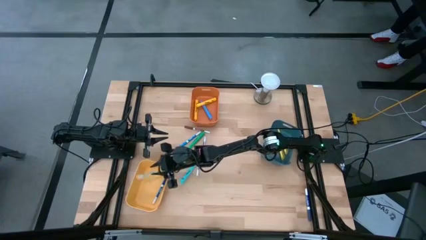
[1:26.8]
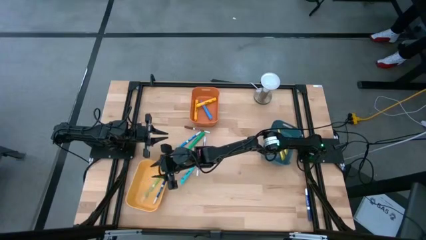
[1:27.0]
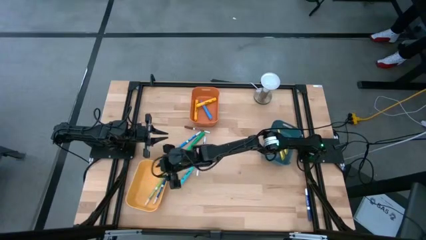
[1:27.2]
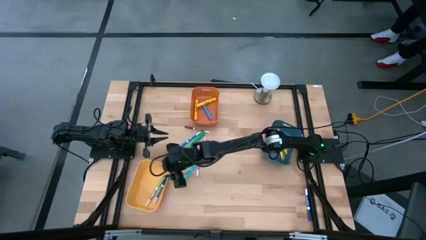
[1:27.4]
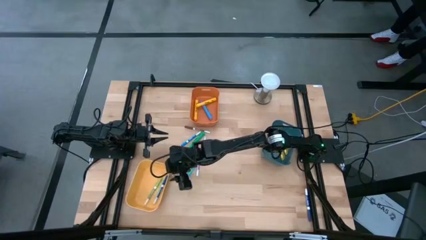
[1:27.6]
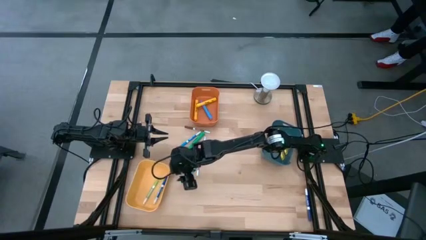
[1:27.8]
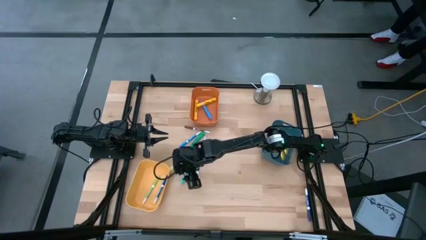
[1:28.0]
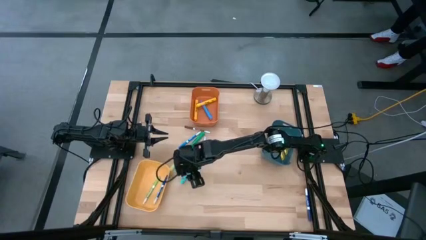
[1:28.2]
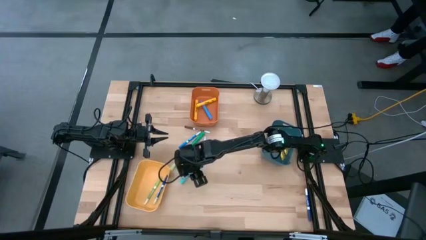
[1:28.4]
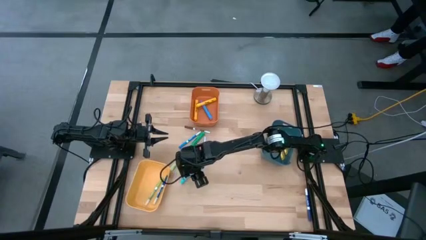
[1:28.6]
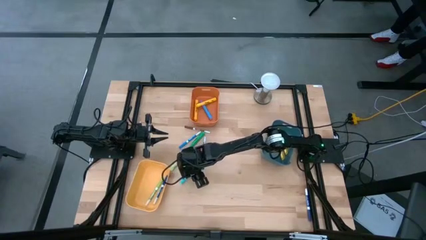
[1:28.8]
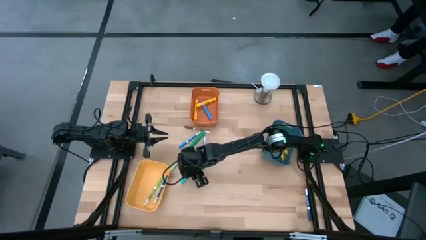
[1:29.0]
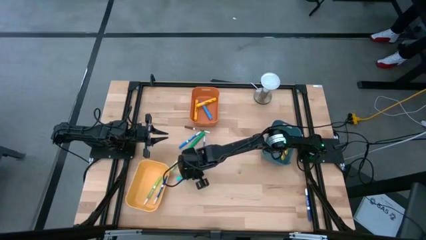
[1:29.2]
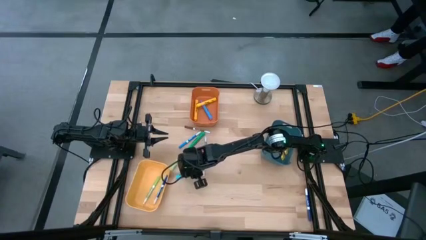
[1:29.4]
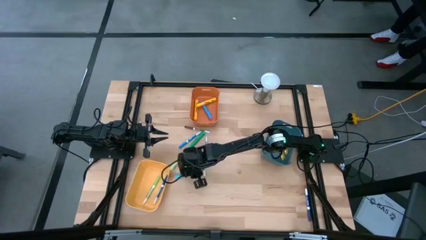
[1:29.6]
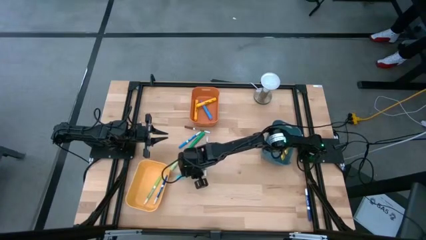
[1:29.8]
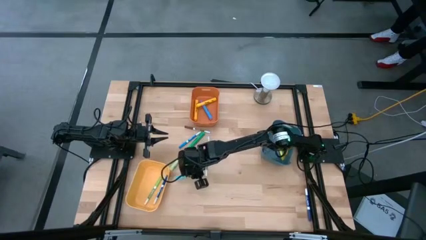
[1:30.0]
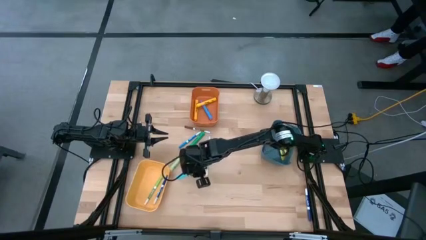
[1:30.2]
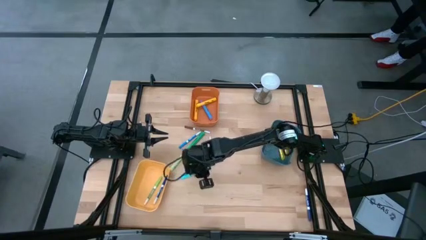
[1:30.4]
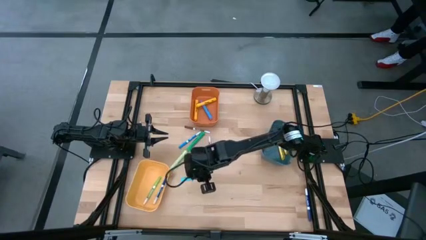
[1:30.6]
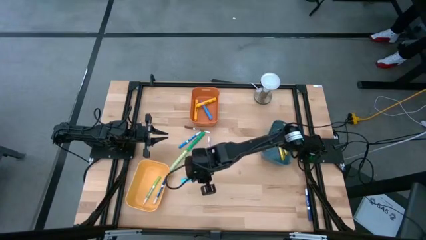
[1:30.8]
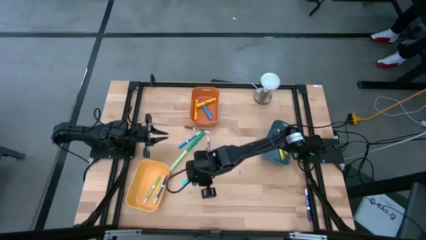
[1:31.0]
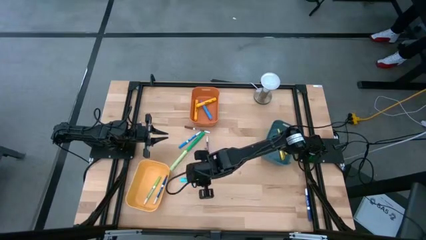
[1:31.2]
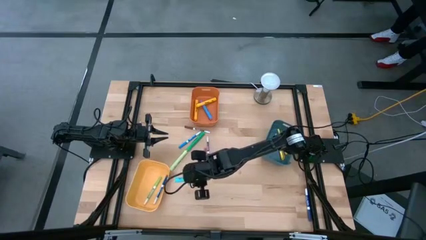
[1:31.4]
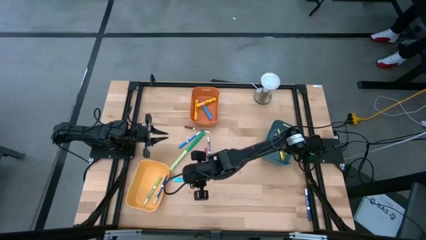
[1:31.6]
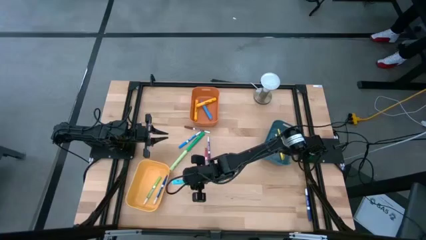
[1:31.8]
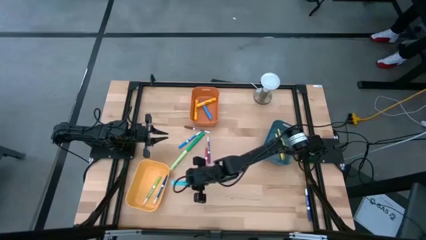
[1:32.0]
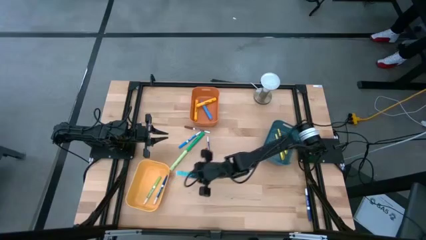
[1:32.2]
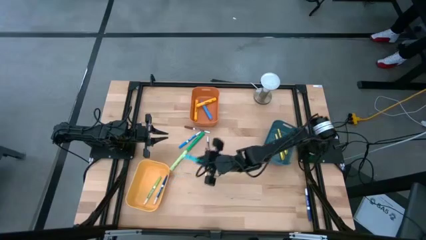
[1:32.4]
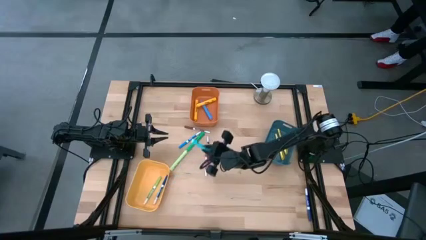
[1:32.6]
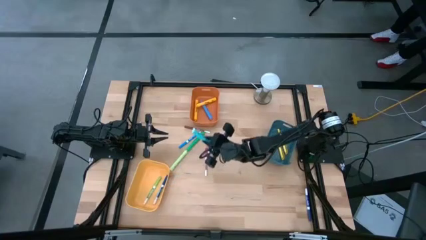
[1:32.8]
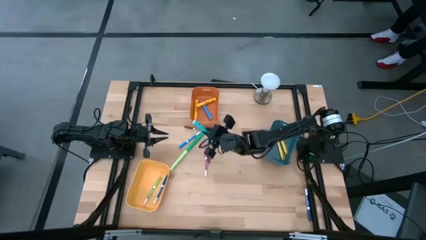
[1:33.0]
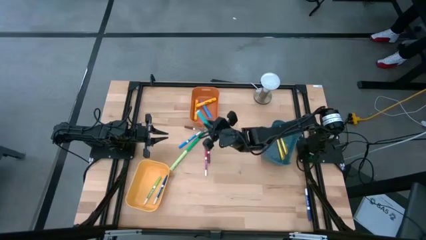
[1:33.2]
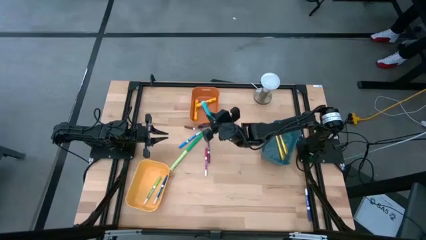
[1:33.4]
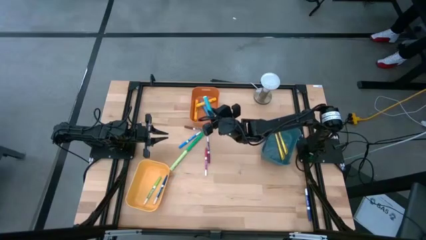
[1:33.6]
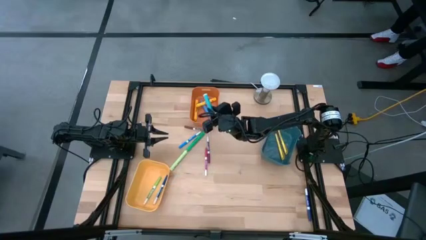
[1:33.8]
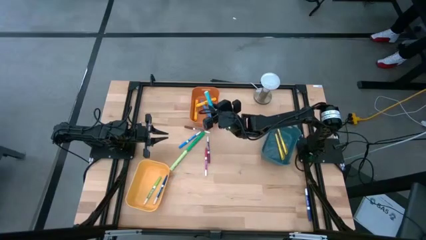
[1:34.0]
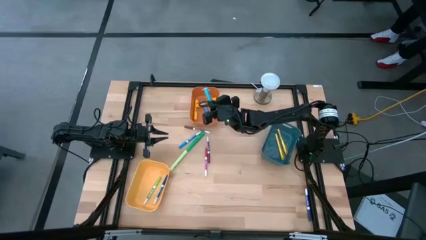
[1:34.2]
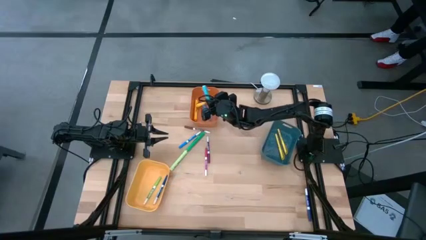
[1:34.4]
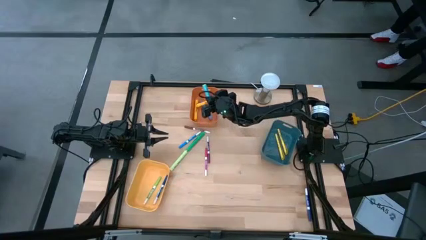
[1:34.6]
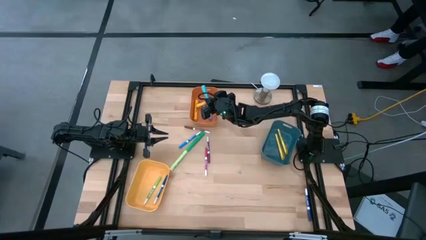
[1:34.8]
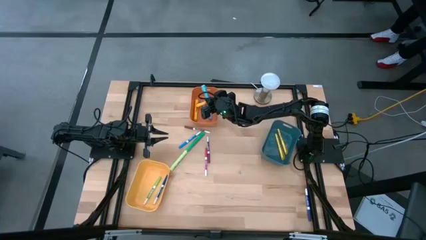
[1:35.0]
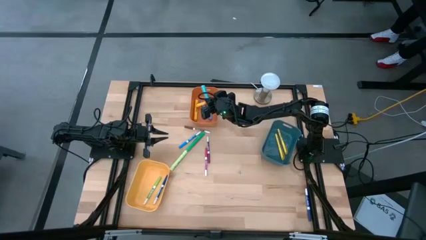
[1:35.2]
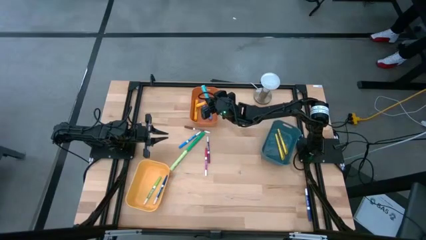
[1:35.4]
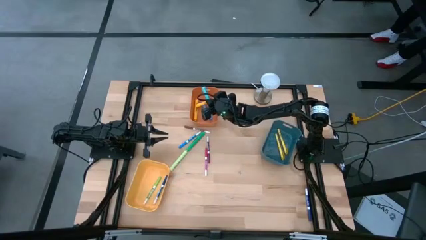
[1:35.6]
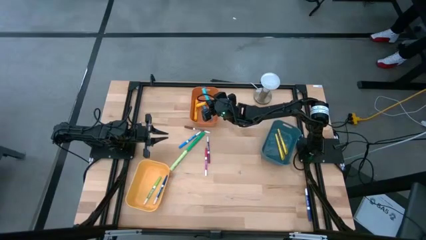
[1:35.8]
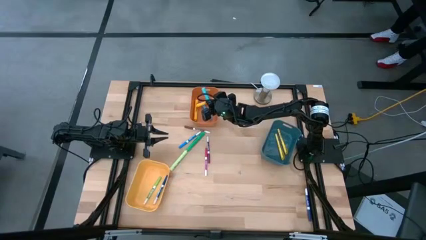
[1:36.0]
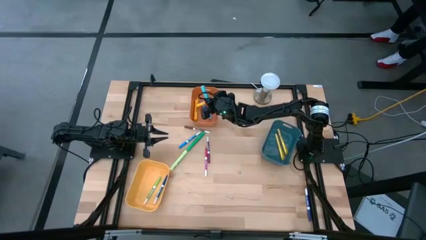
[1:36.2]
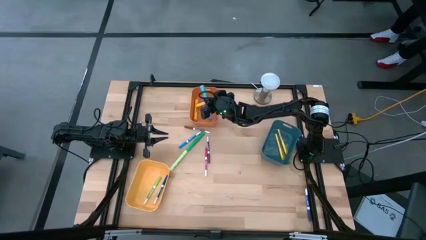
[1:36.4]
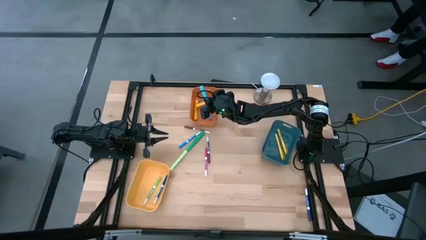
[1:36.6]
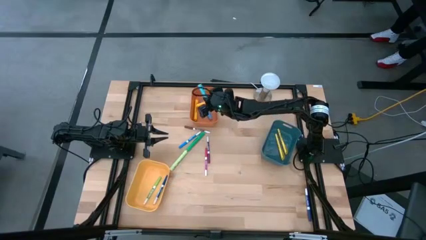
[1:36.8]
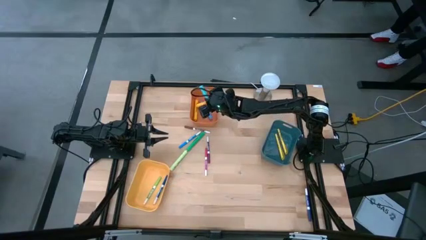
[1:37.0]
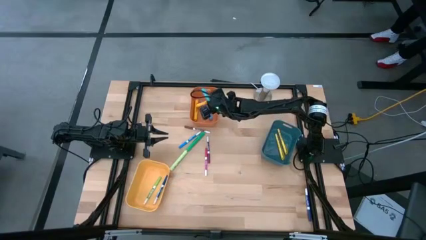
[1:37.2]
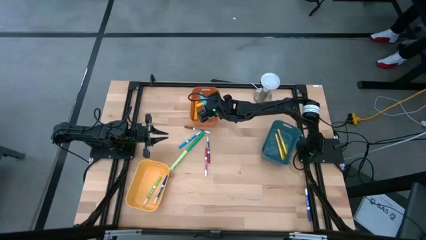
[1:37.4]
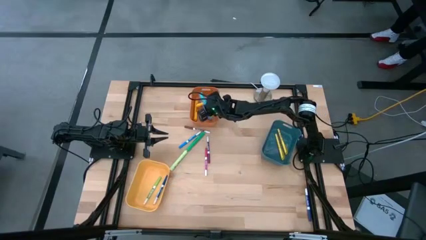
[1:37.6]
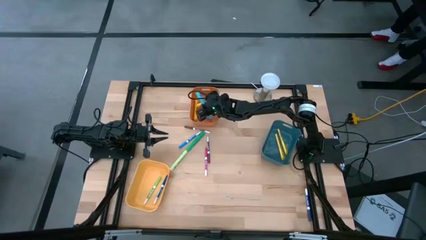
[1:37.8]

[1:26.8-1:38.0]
Task: Pick & Place Markers
Put the light blue highlighter pen into the orange bin

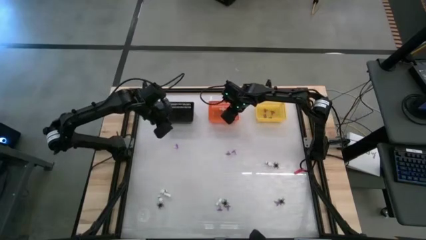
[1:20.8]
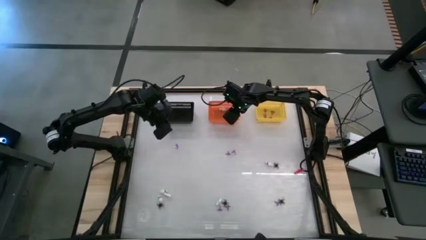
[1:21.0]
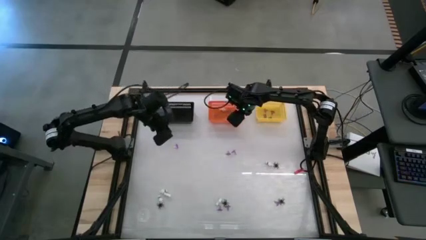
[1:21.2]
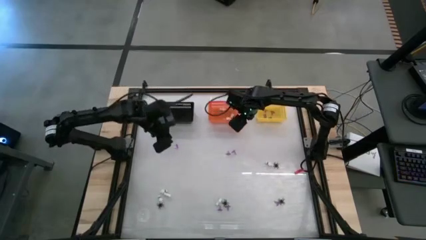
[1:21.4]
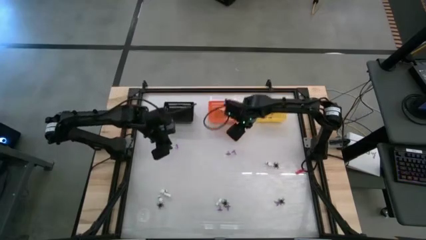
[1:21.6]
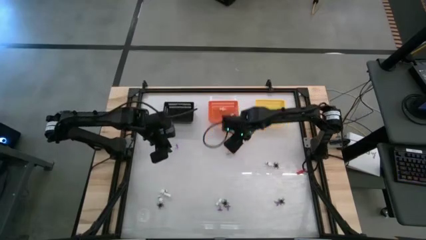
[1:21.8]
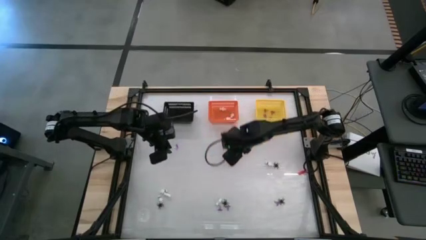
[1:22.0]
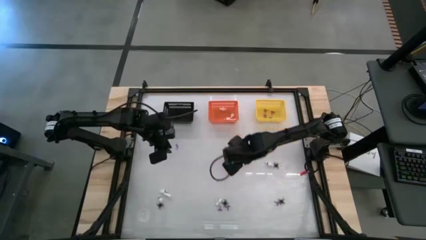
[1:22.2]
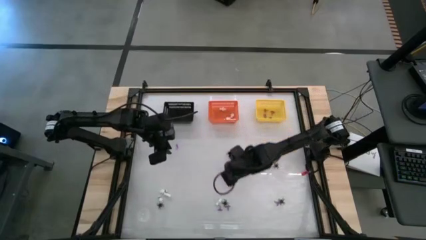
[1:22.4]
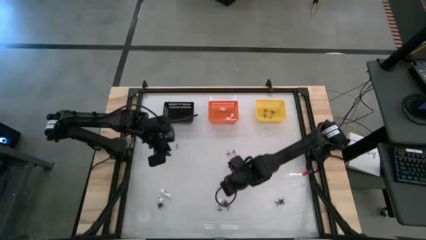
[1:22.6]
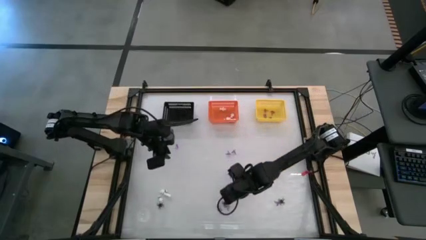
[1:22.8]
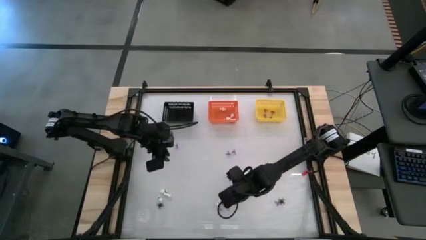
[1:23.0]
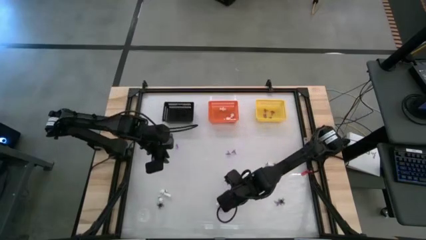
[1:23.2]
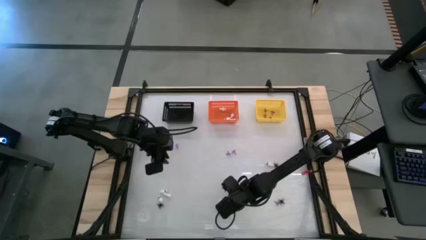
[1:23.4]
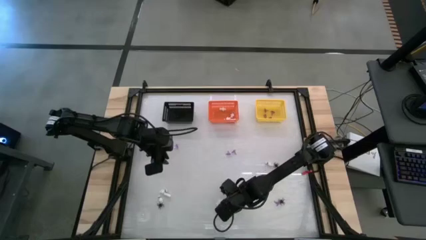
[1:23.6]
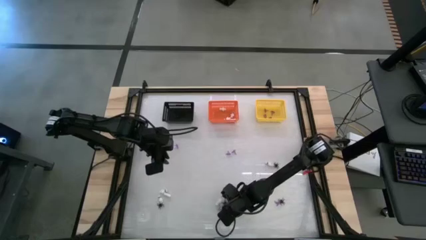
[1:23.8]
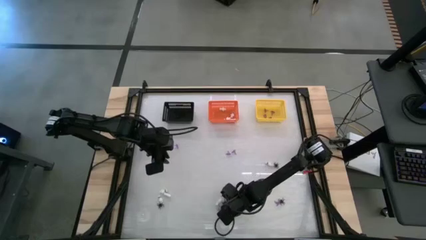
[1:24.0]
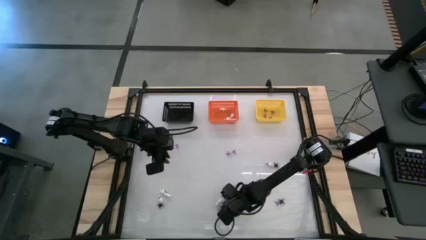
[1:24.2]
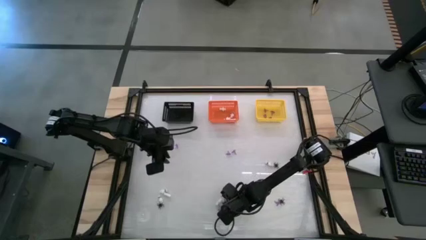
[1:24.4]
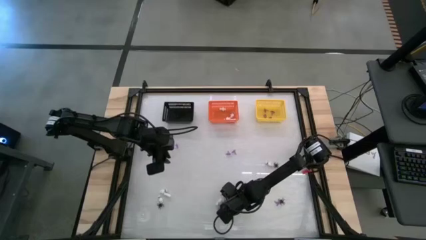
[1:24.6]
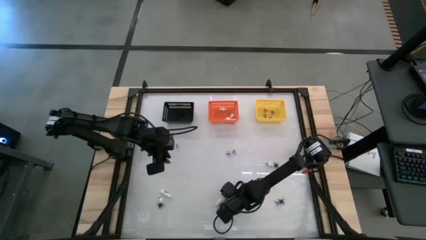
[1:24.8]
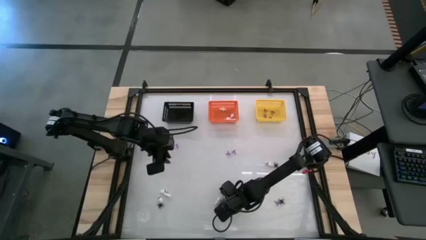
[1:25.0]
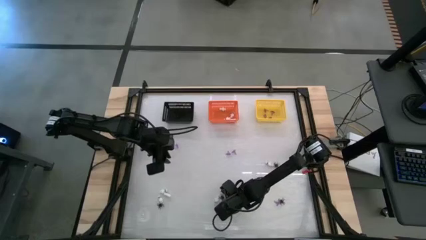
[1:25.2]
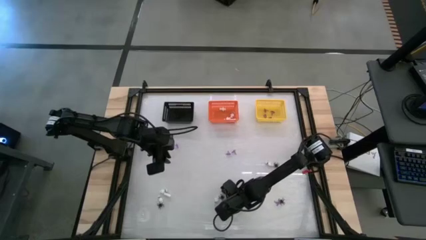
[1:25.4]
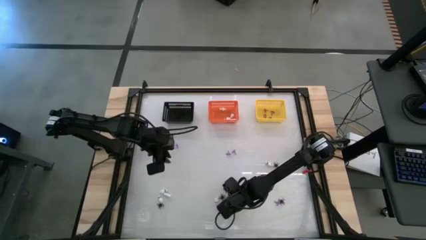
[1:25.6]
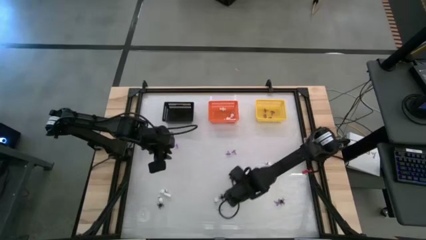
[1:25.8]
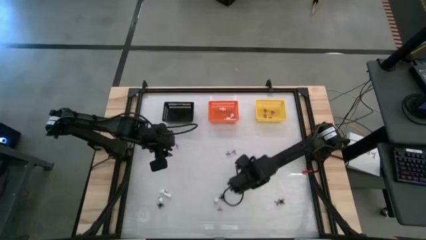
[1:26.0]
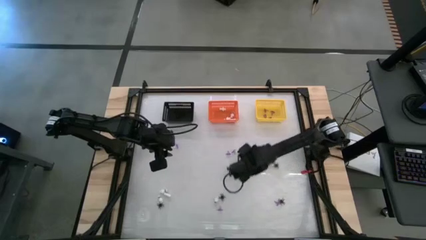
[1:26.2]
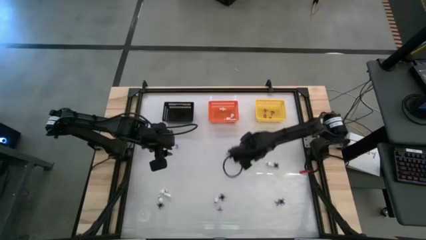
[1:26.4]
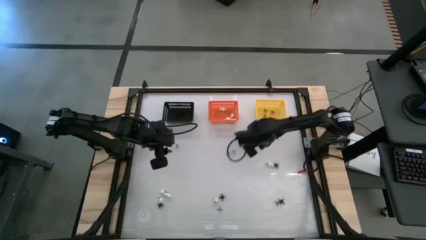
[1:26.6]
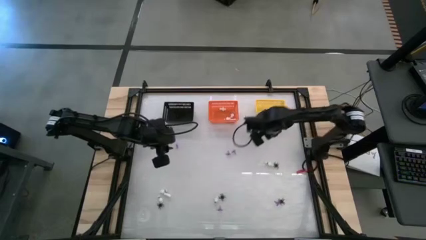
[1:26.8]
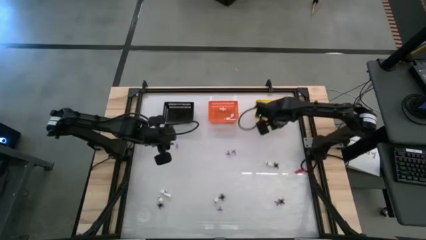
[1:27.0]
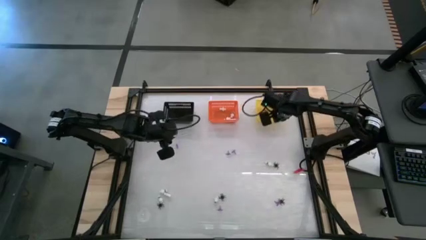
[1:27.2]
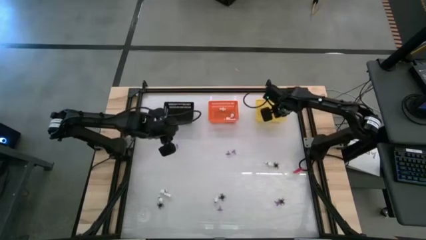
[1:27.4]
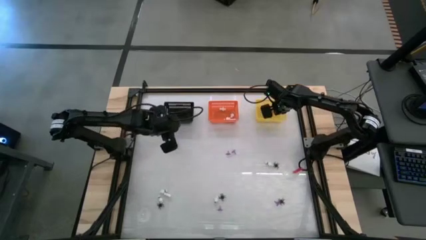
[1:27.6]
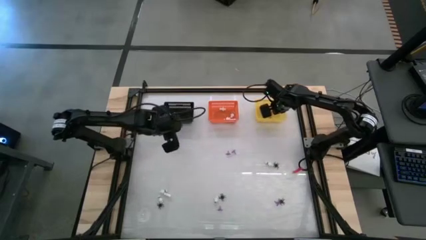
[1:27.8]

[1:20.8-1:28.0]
Task: Sort Halloween decoration
Put the witch hat toy into the yellow bin
